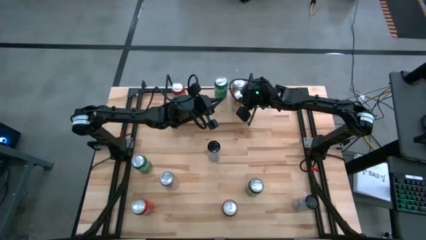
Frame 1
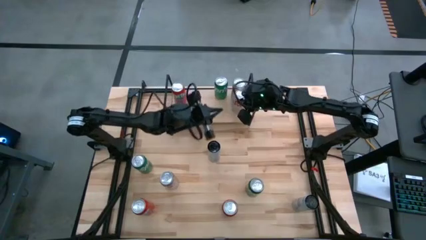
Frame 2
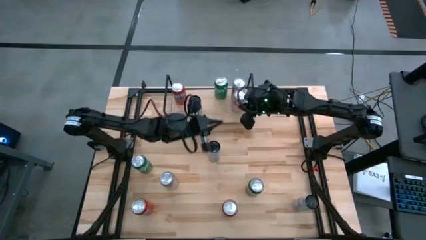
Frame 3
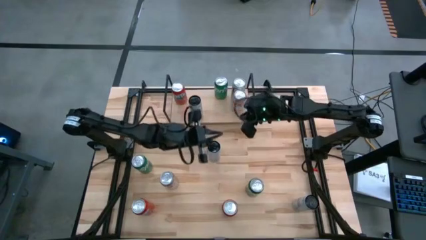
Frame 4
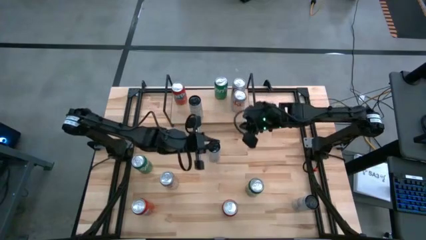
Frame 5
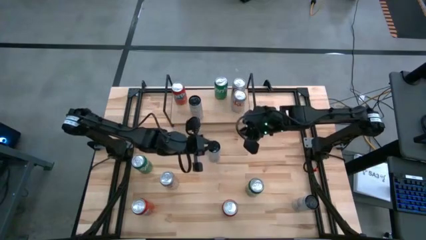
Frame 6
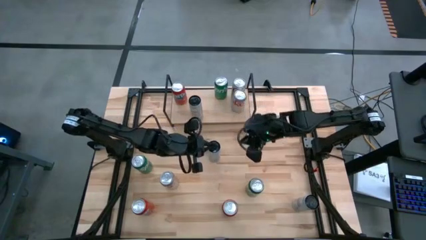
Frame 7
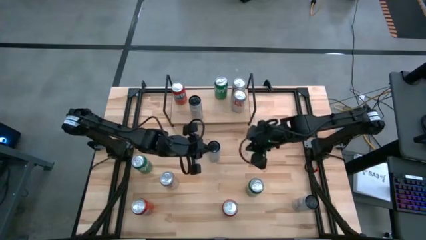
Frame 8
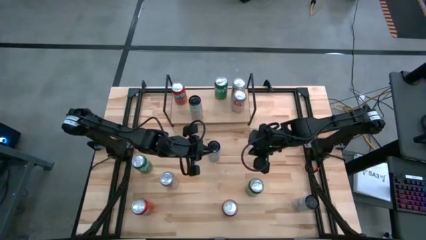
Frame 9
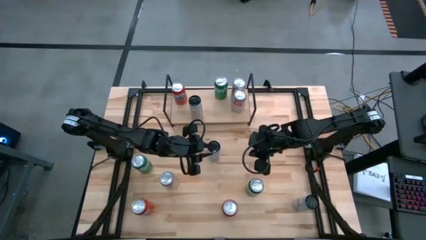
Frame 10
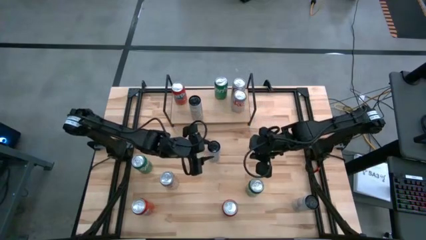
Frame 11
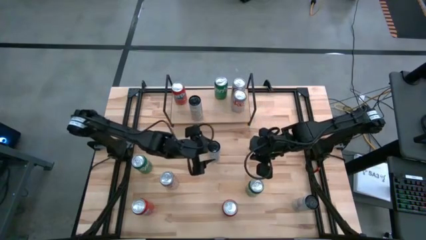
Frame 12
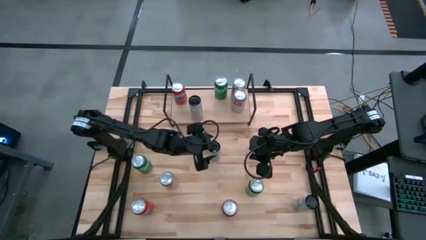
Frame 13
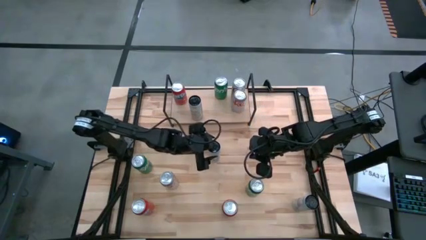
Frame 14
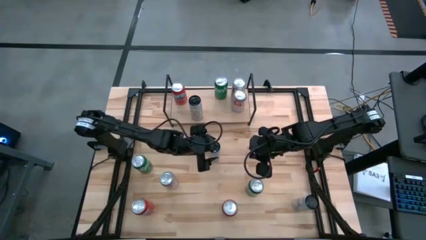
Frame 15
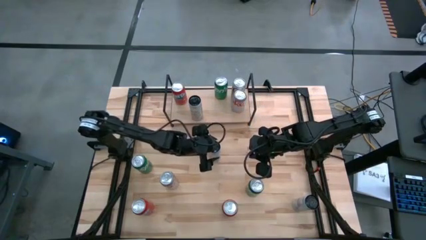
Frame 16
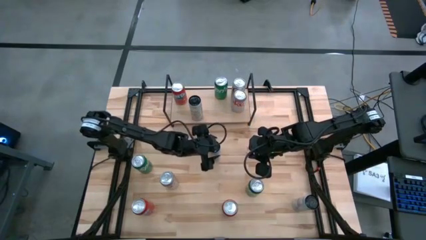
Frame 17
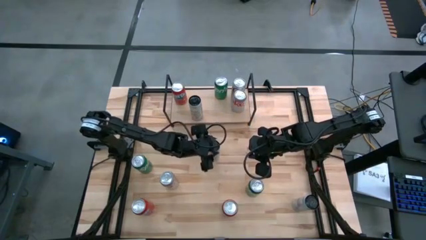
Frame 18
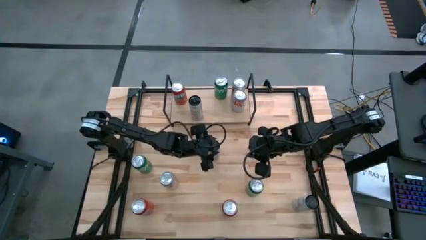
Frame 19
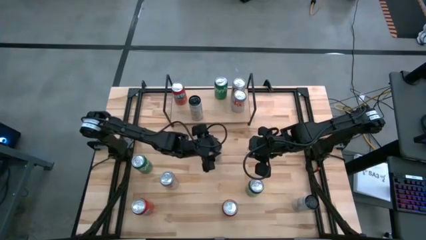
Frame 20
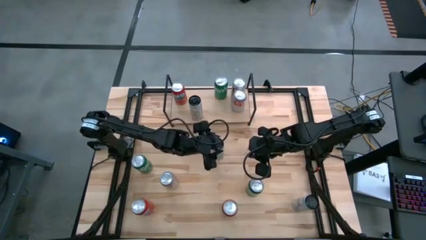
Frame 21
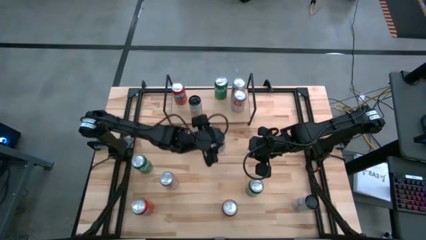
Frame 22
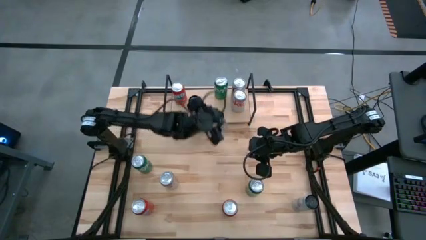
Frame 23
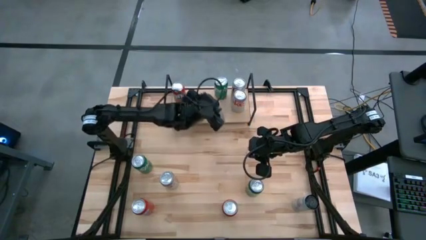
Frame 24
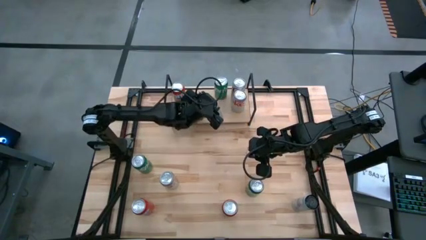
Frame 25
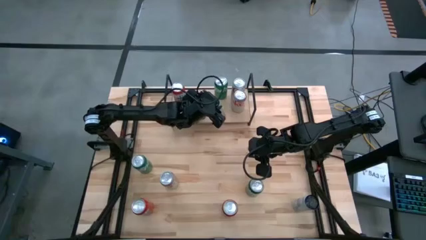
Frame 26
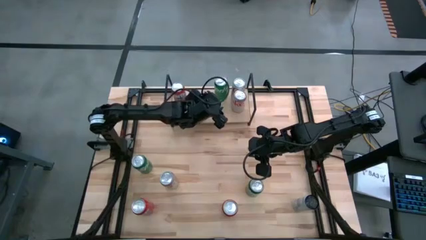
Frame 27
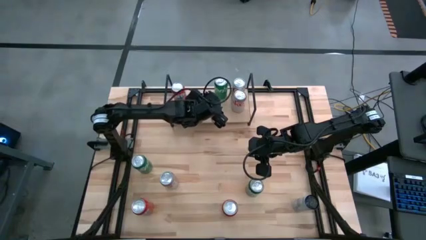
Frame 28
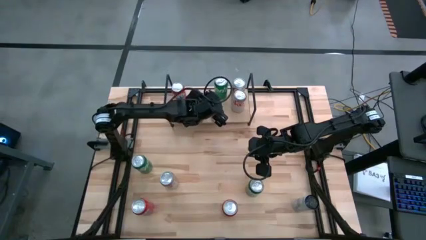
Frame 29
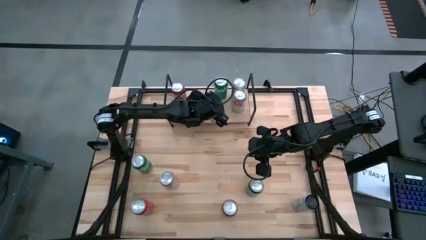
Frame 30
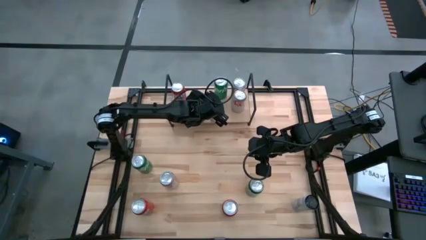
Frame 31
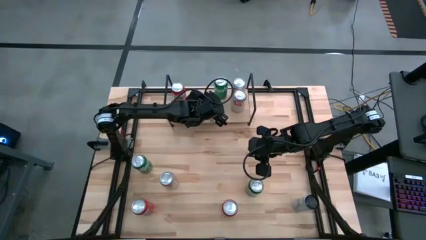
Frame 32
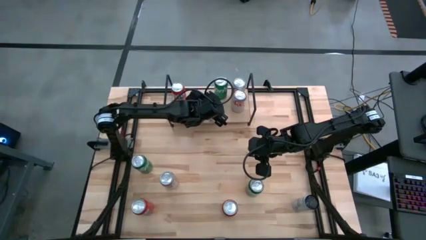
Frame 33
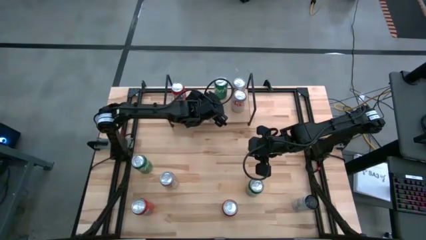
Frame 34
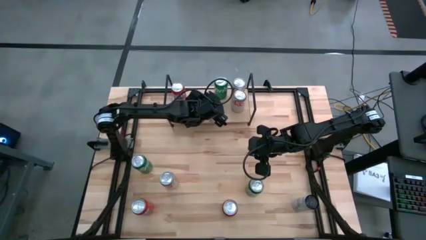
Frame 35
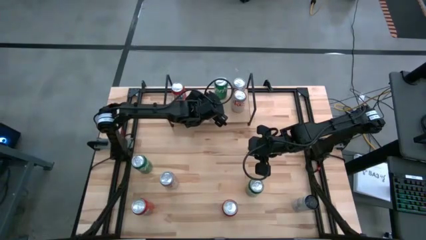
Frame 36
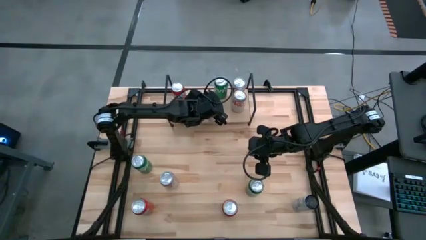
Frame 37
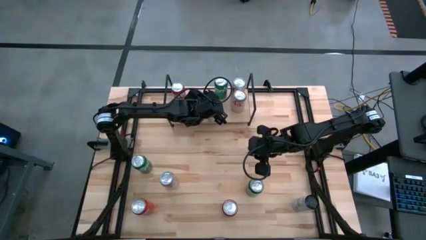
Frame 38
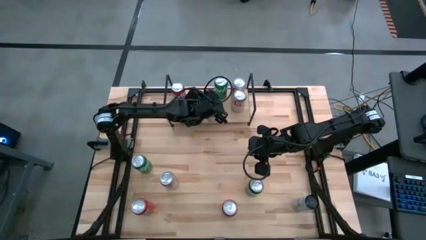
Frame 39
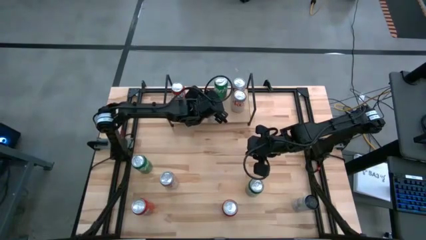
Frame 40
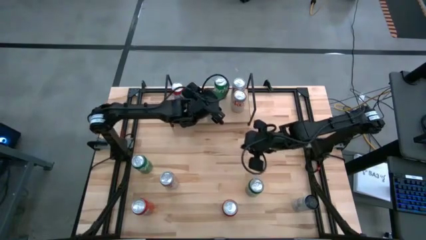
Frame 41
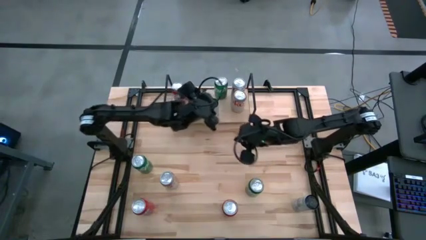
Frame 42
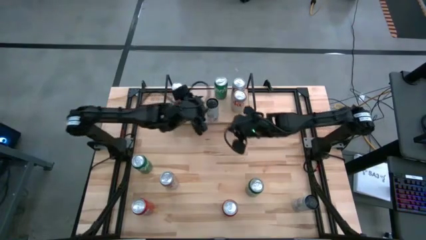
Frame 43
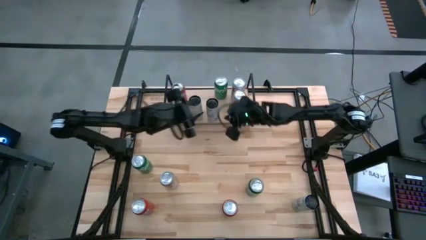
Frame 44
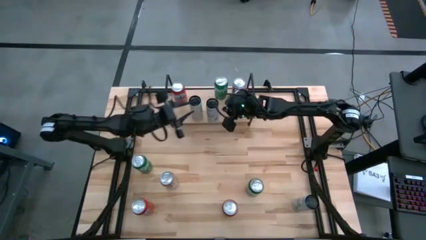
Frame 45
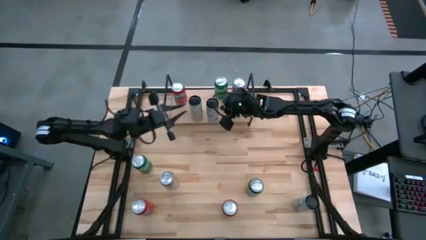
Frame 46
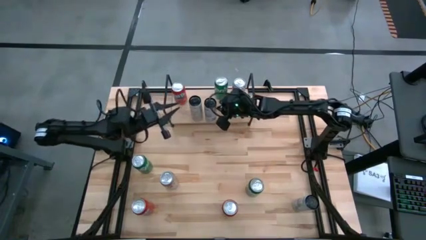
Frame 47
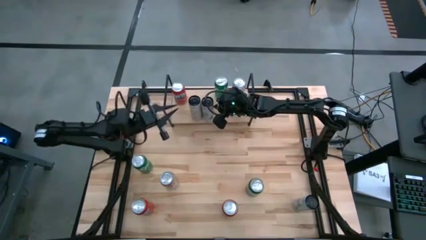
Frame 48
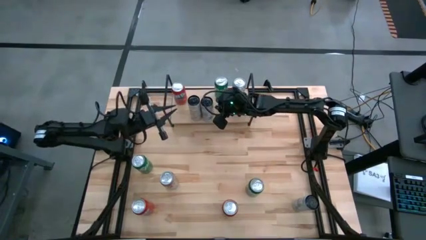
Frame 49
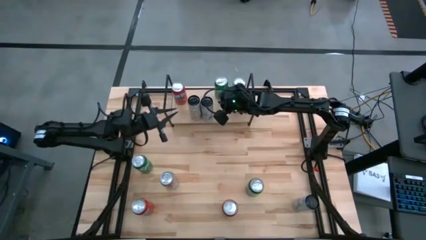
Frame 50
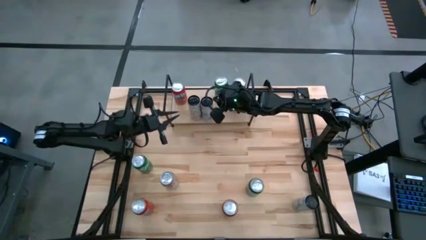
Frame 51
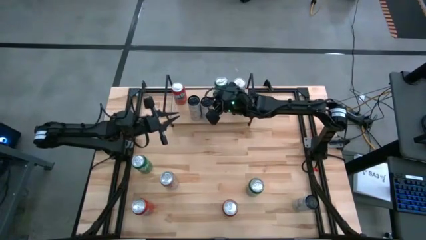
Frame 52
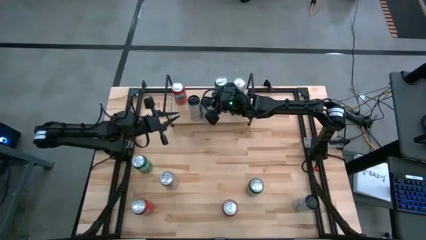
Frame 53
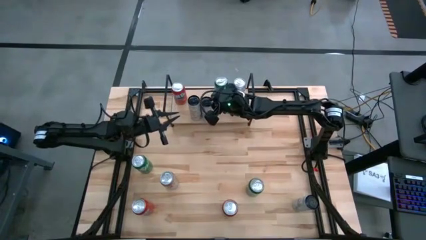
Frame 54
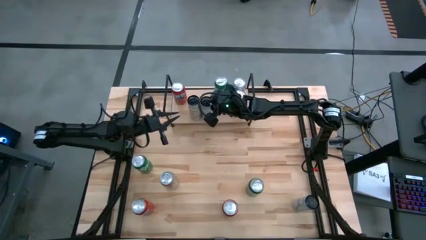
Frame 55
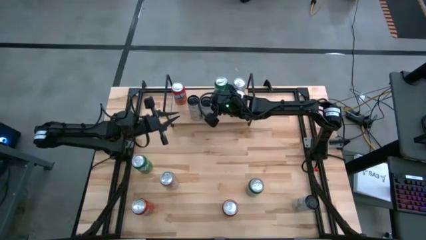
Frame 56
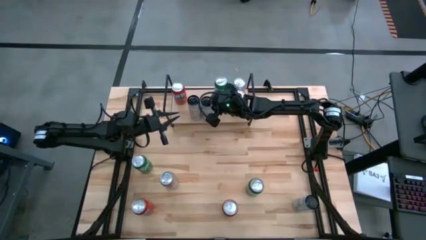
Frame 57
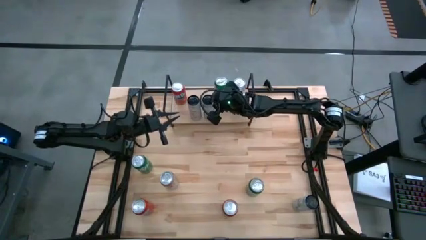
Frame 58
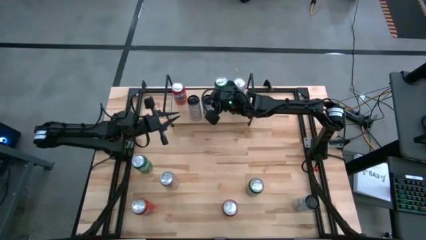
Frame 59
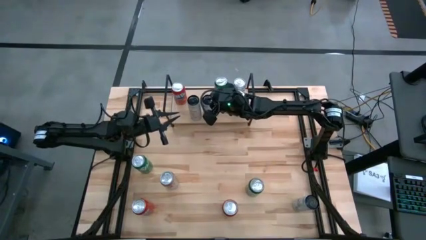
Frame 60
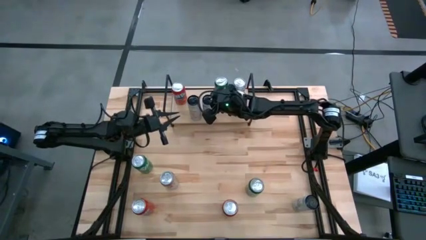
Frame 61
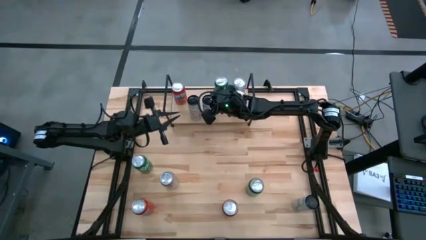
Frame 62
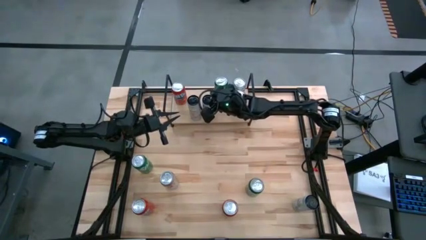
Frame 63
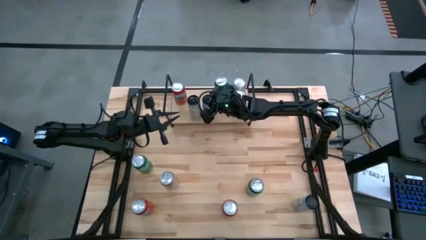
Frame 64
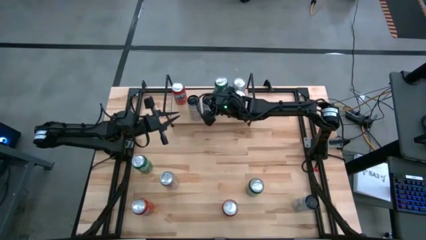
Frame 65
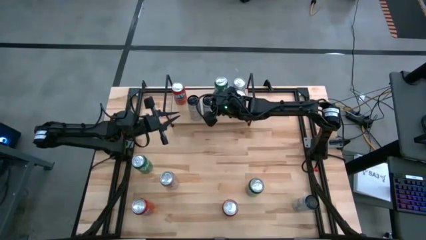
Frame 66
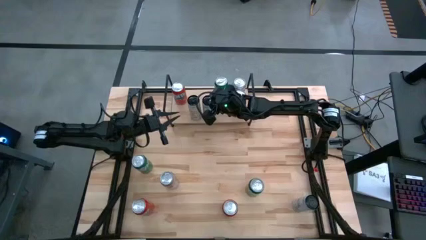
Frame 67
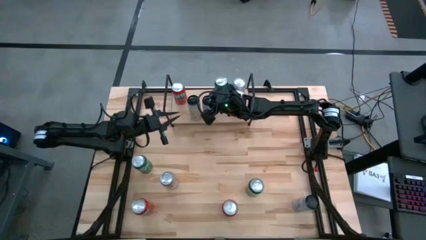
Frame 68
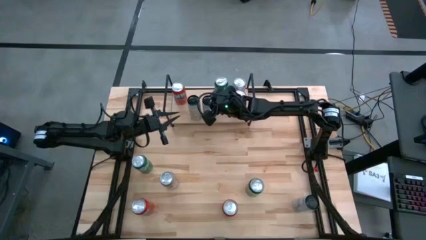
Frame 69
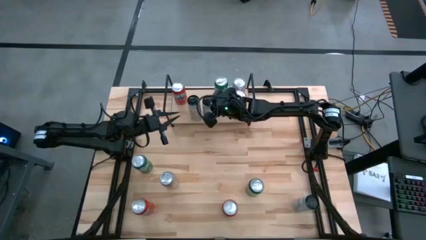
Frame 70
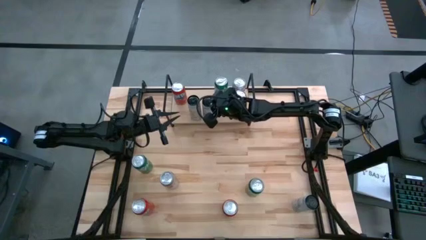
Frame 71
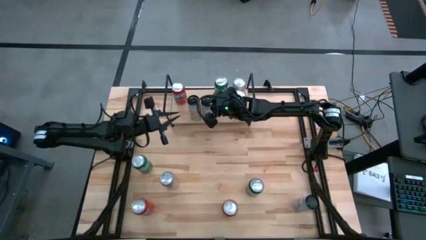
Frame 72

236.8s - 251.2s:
Task: Sort soda cans
Put the left white blue soda can on the shelf
